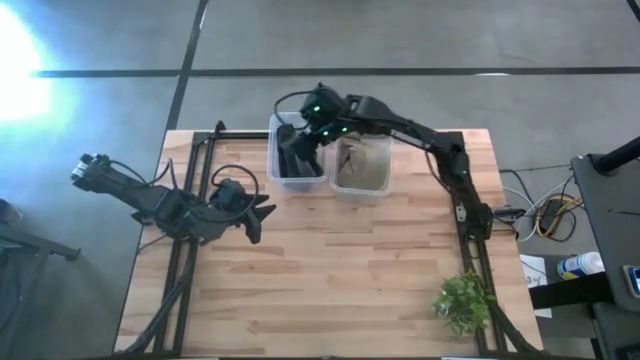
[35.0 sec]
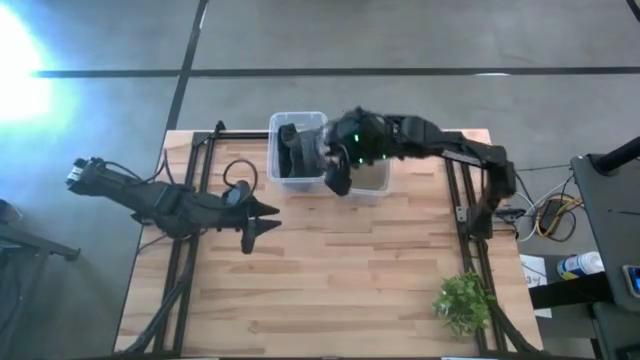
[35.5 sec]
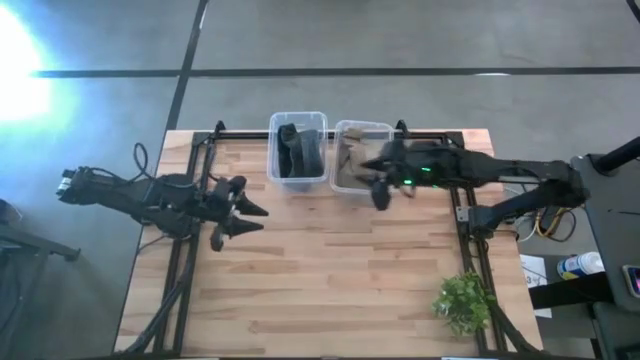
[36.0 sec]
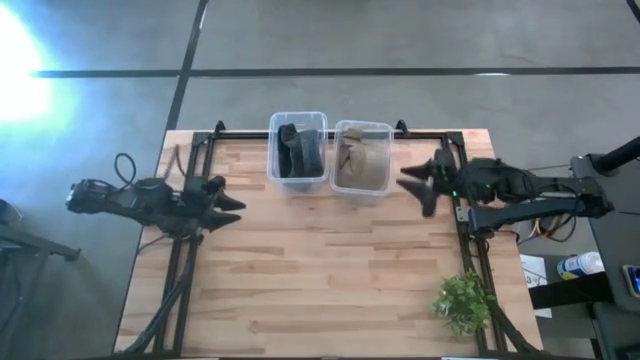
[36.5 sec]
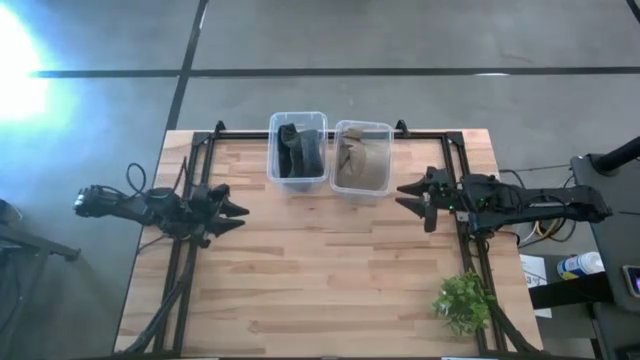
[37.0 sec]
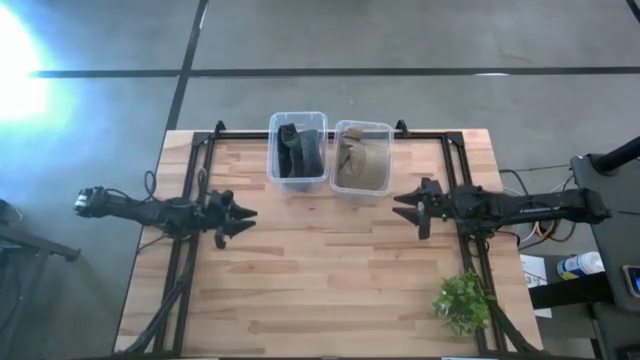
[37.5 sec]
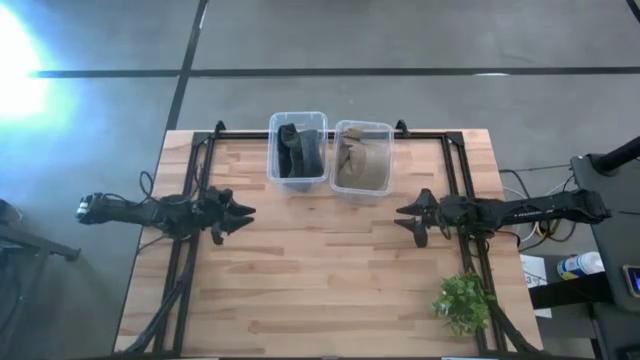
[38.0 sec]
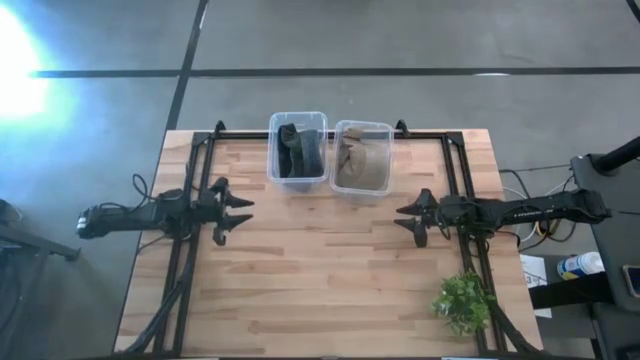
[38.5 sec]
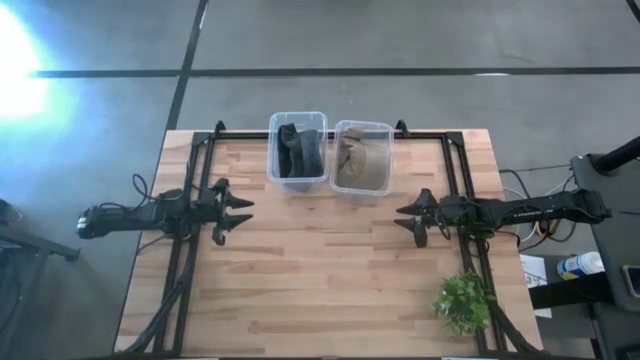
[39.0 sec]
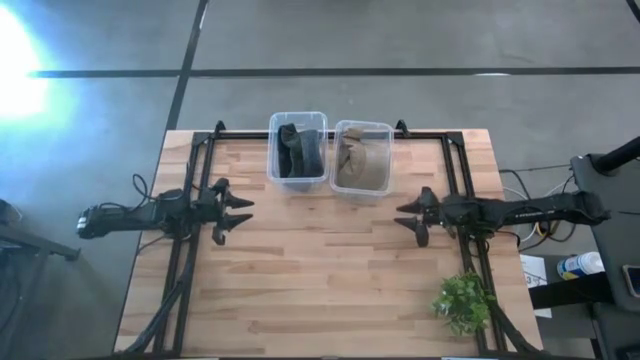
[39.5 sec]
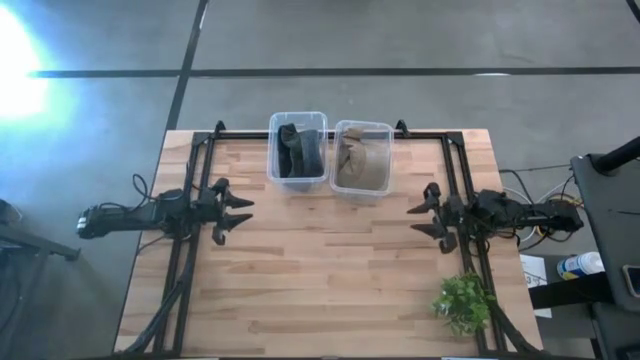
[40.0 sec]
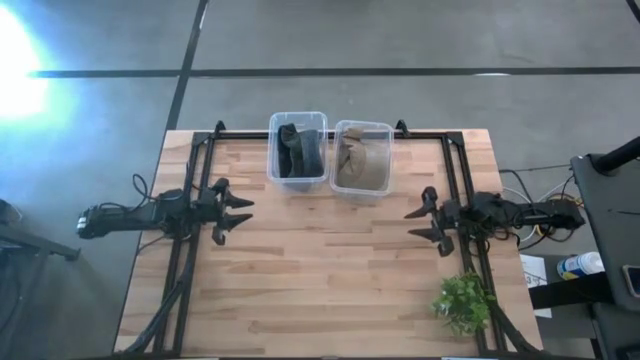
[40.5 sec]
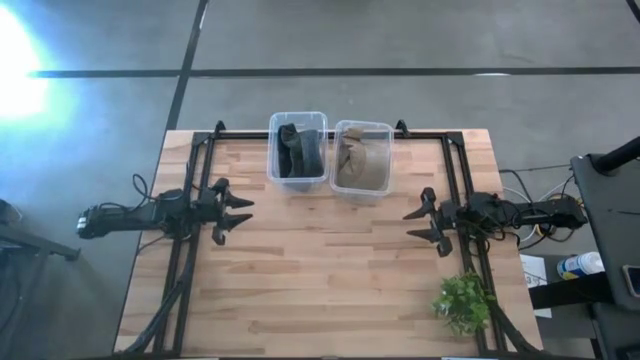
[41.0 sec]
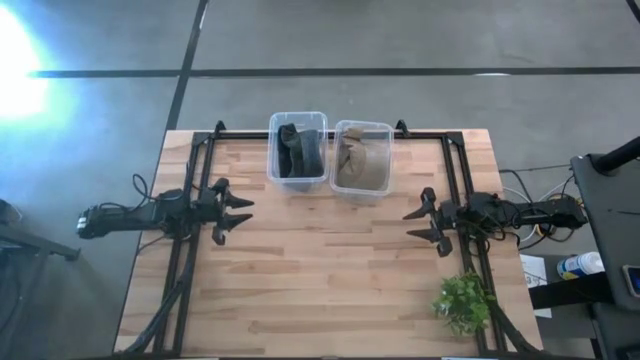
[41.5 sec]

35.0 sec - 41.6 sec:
Task: Pick & Place hat
Return to Home Position

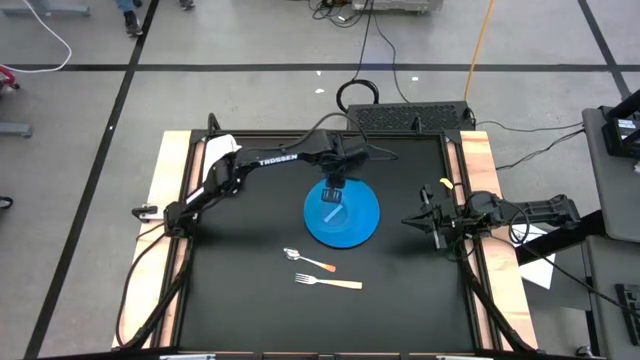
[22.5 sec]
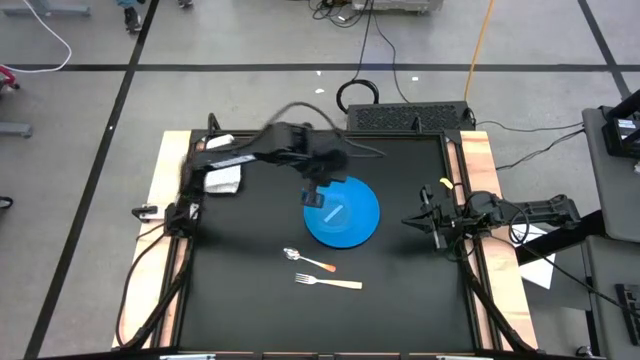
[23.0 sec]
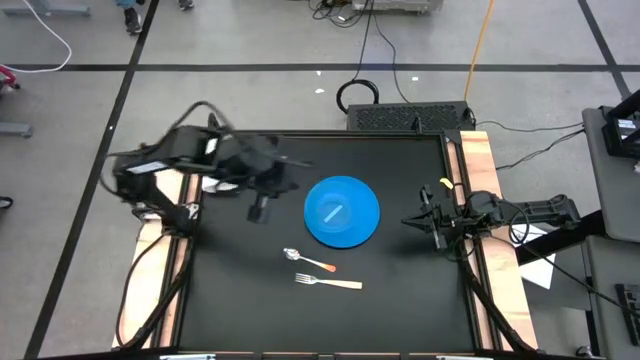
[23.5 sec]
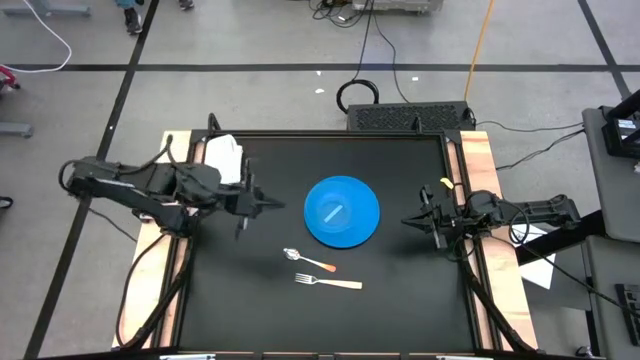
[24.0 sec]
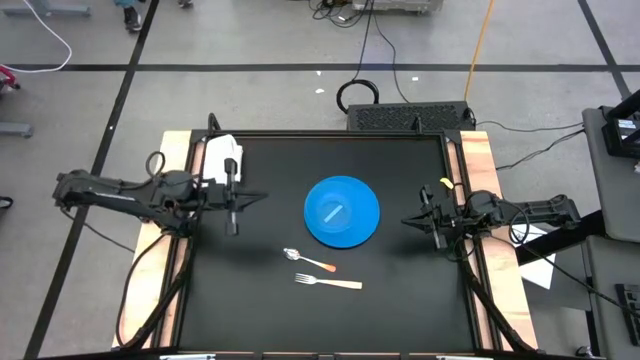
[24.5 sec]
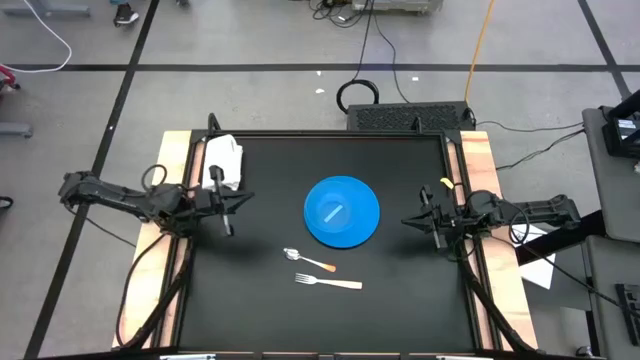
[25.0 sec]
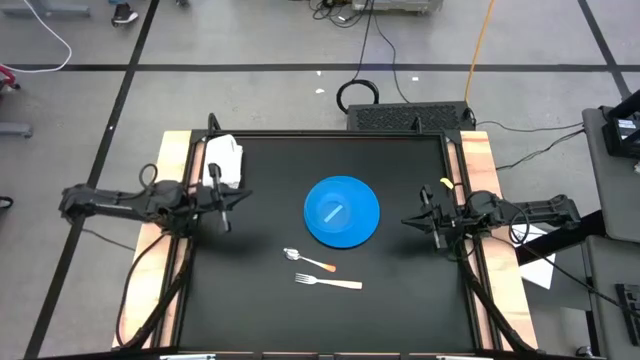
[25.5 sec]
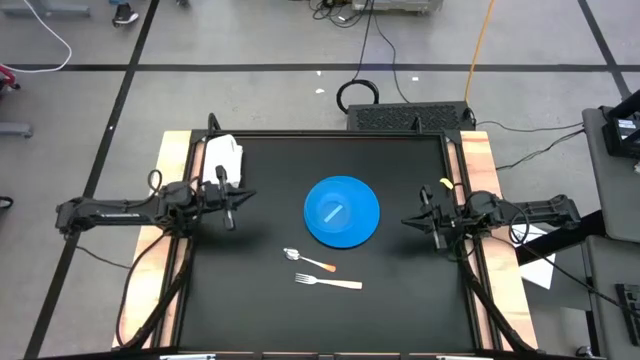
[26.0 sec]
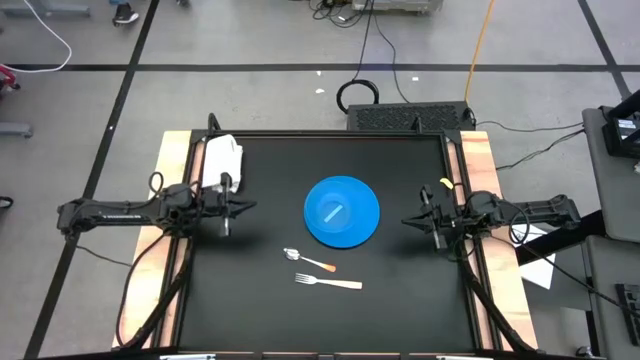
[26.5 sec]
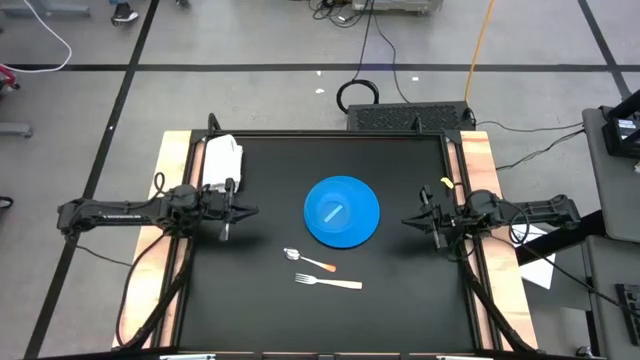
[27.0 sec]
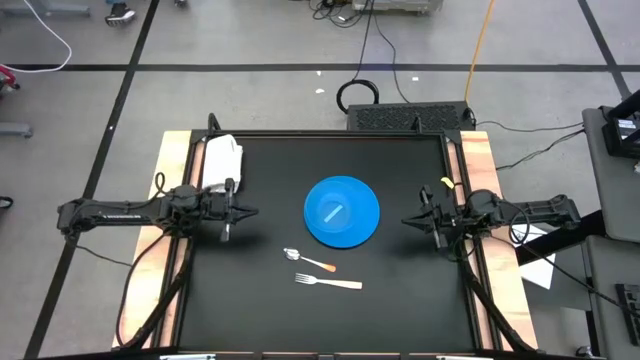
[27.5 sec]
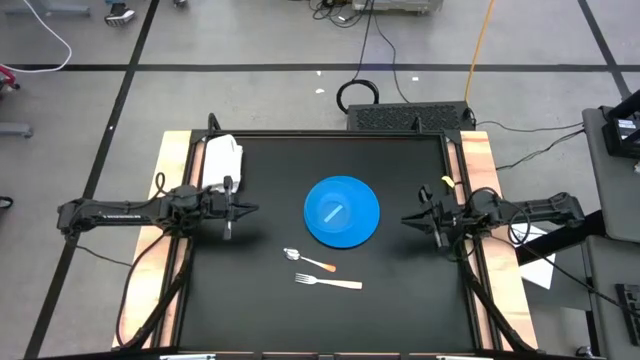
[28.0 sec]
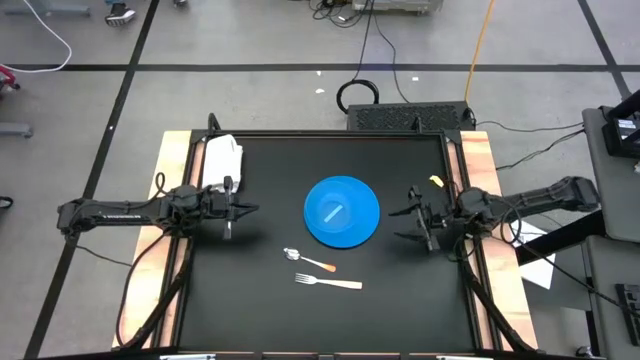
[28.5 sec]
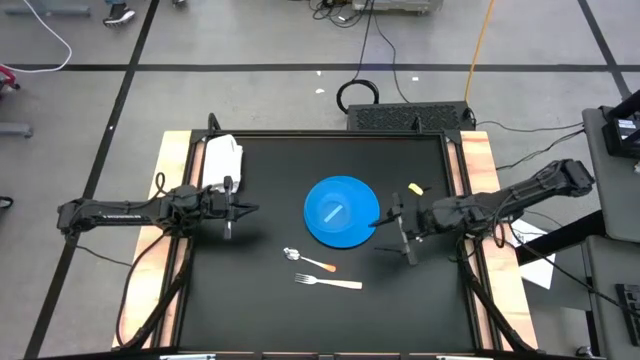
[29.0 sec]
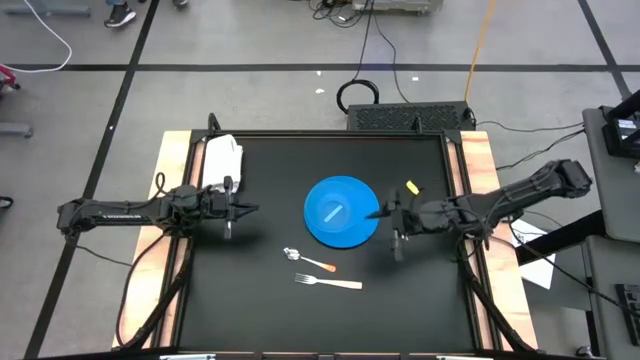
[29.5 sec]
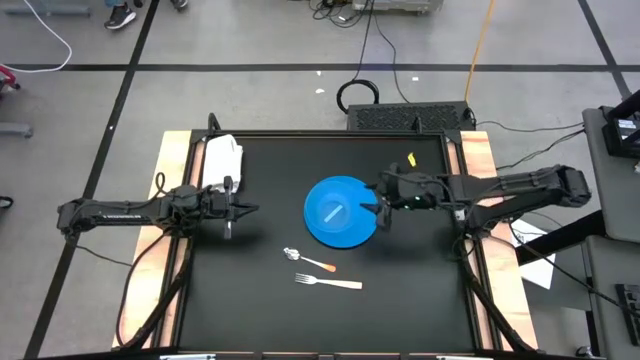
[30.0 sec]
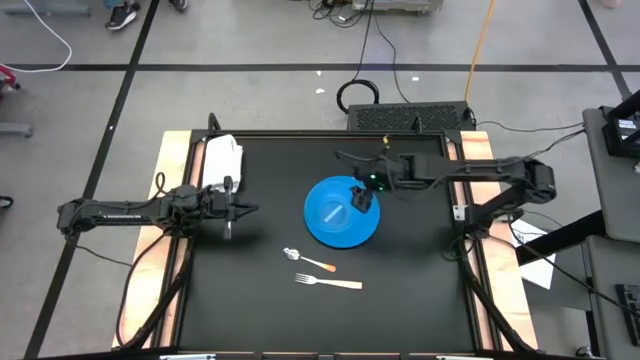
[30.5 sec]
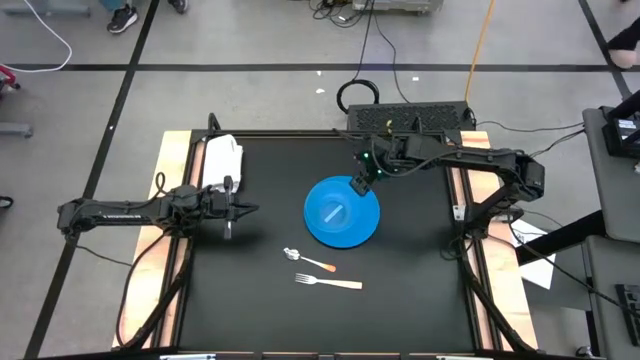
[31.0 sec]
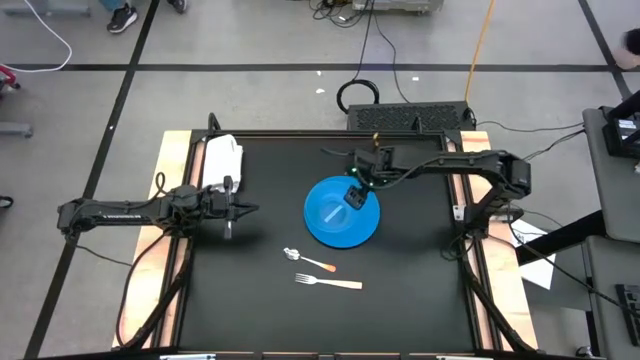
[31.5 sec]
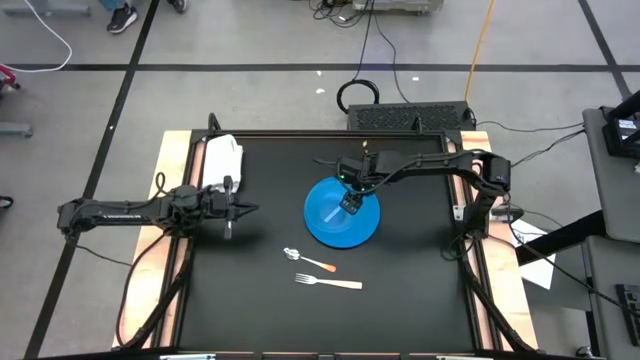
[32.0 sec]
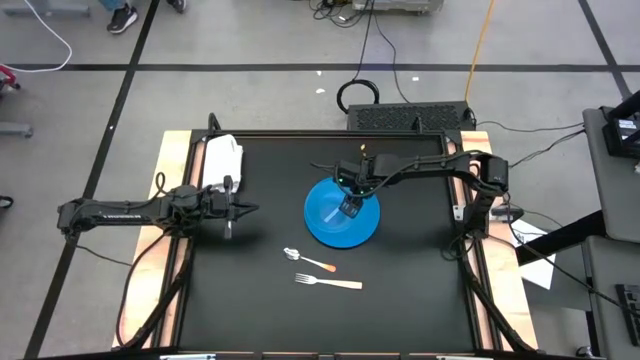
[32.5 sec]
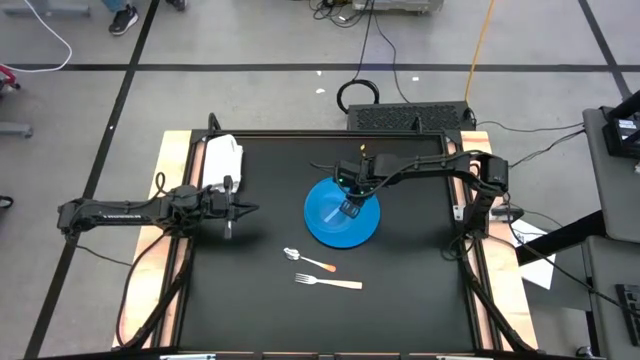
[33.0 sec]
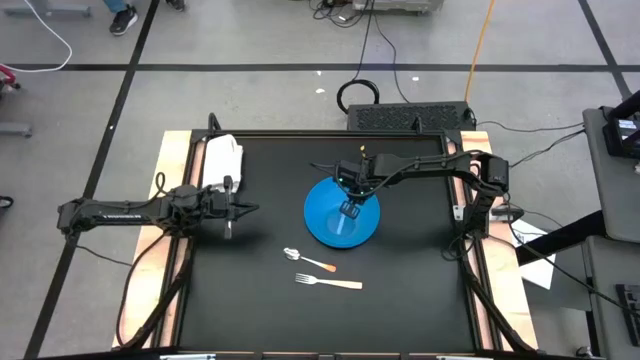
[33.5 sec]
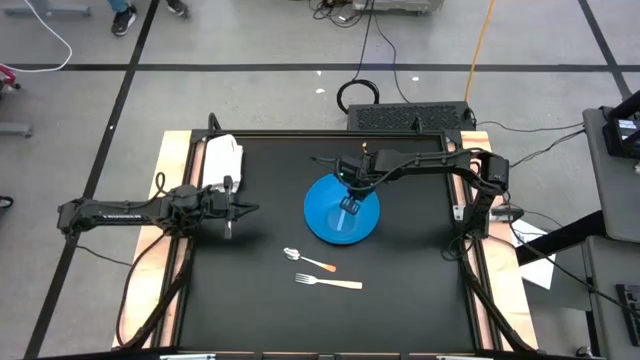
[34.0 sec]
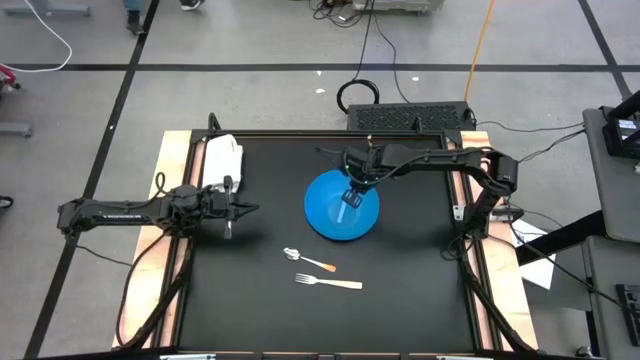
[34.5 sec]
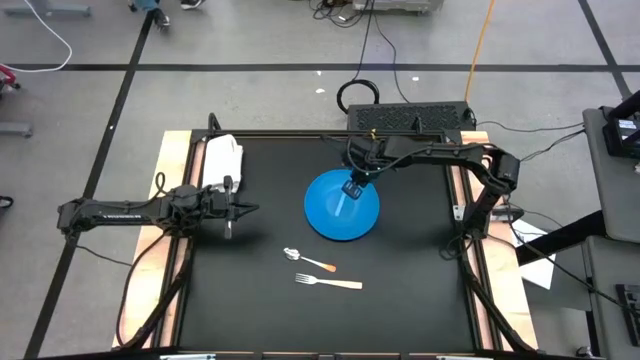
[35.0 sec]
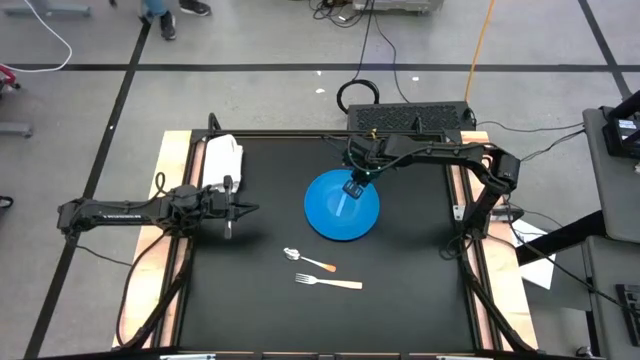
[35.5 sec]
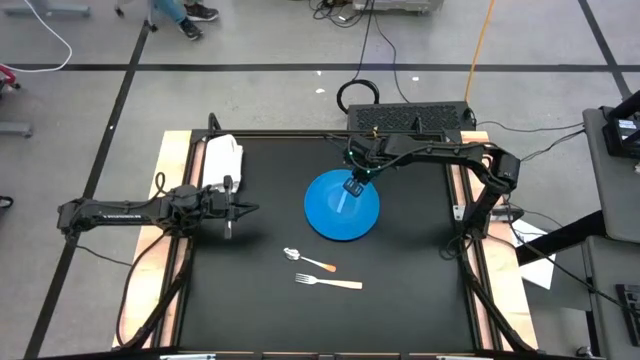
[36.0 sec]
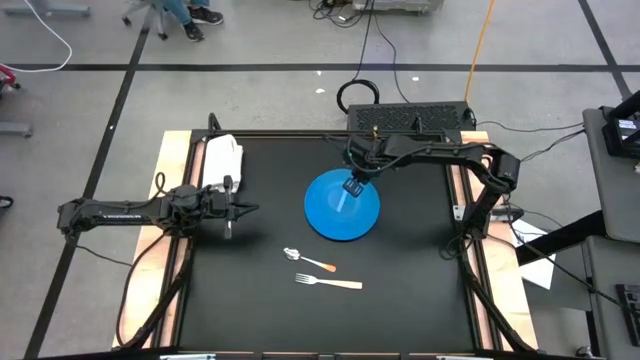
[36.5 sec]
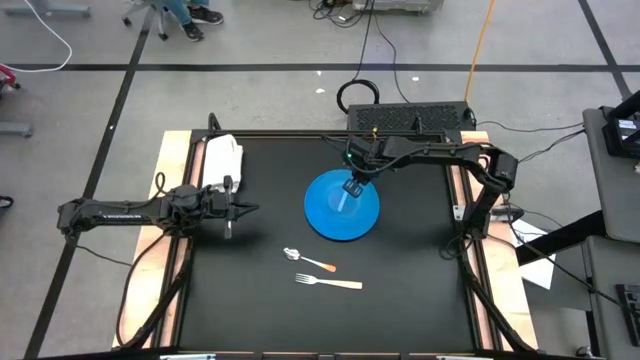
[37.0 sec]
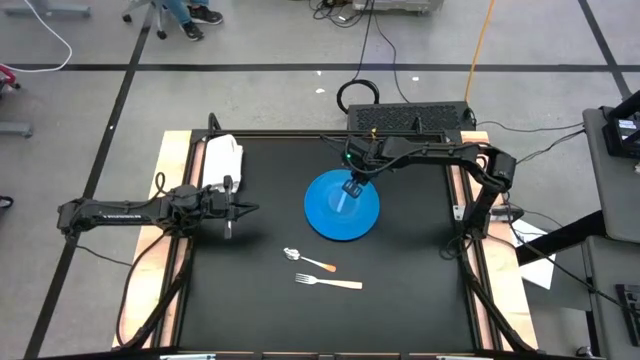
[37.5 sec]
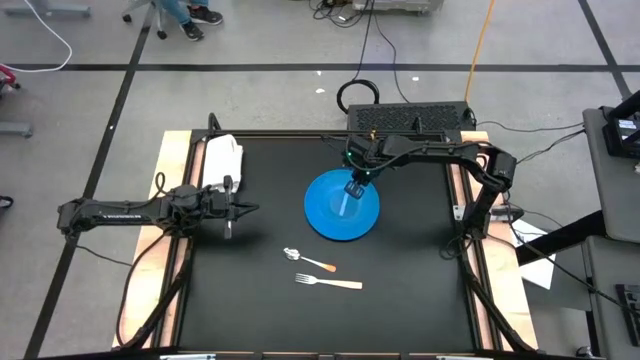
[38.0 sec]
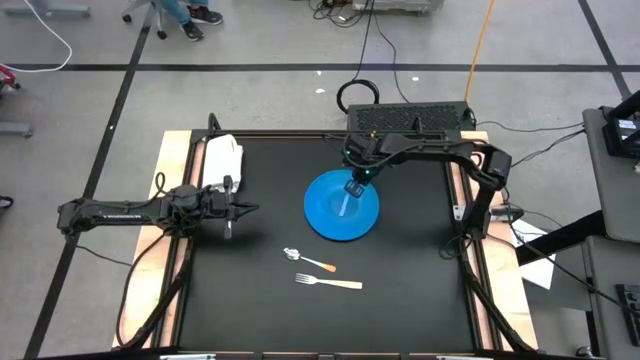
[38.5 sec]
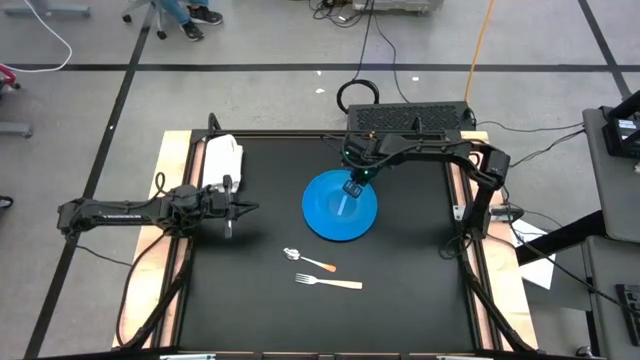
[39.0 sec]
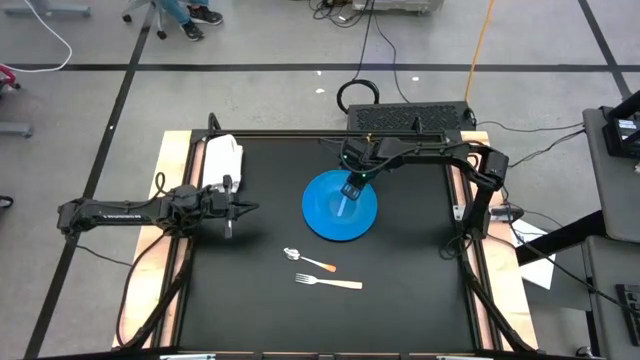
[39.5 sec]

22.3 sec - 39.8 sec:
Task: Set table place
Adjust the blue bowl to the center of the blue plate on the table
